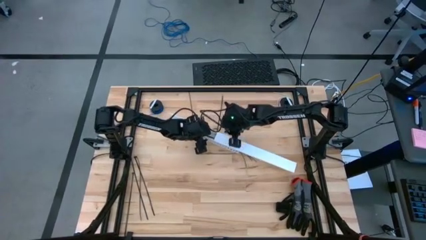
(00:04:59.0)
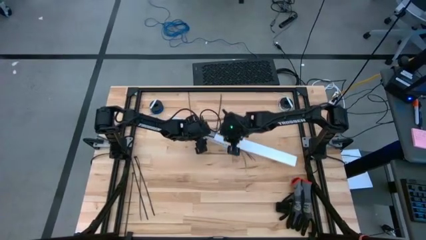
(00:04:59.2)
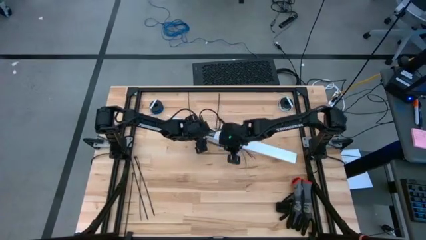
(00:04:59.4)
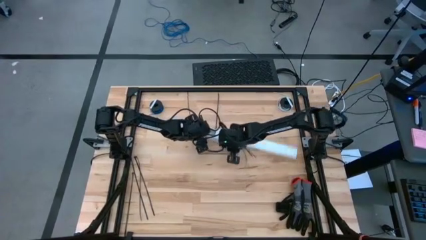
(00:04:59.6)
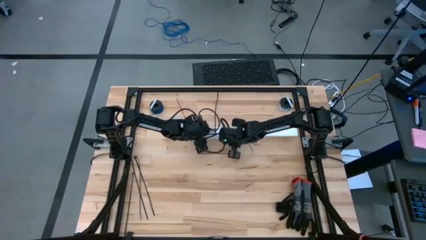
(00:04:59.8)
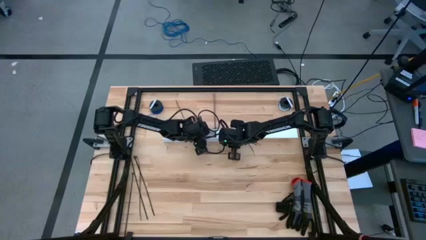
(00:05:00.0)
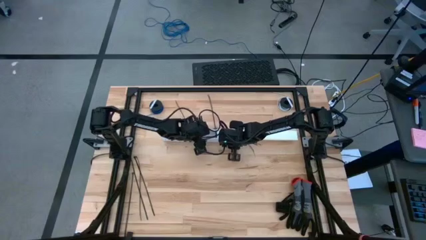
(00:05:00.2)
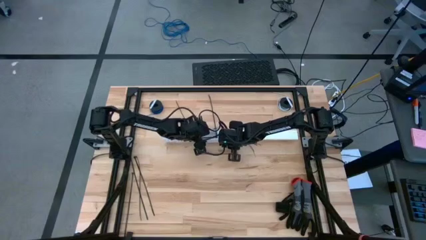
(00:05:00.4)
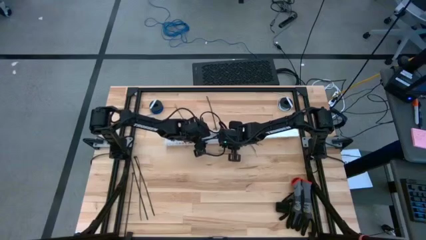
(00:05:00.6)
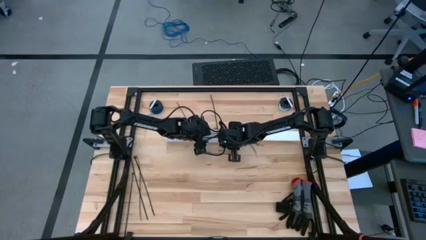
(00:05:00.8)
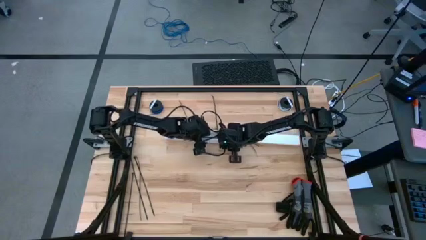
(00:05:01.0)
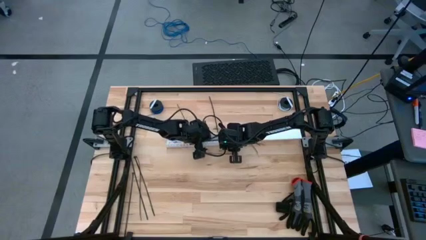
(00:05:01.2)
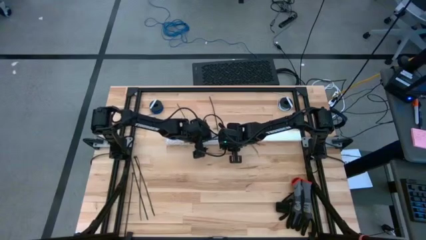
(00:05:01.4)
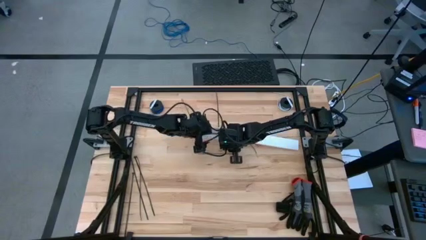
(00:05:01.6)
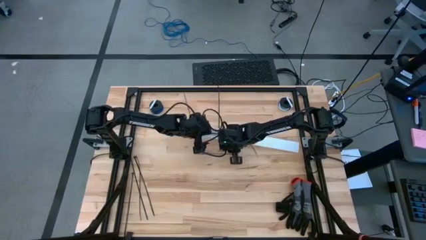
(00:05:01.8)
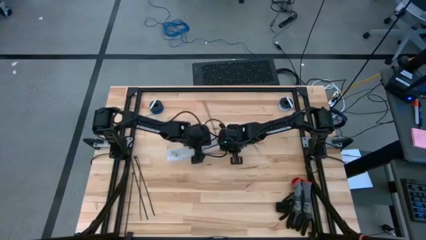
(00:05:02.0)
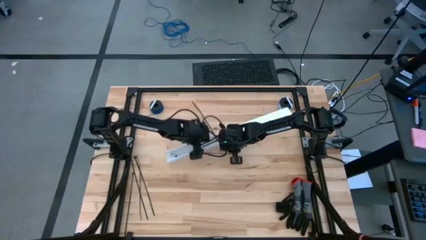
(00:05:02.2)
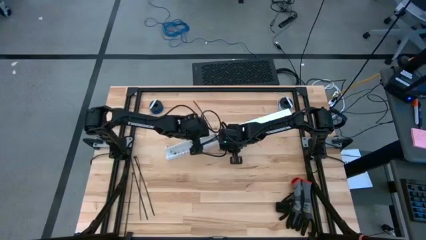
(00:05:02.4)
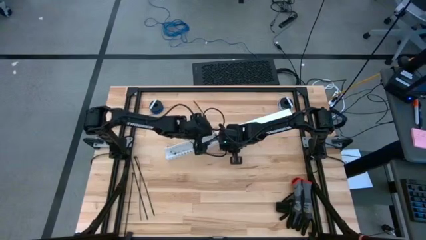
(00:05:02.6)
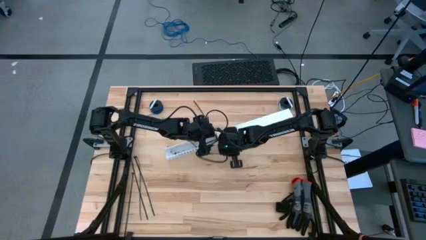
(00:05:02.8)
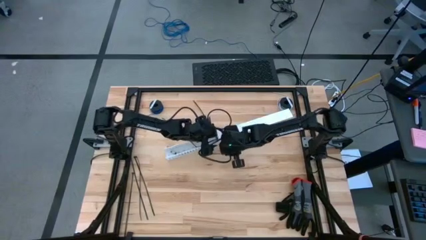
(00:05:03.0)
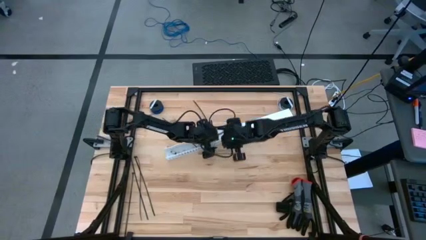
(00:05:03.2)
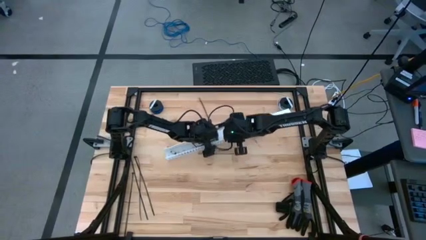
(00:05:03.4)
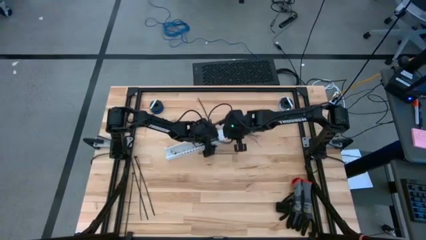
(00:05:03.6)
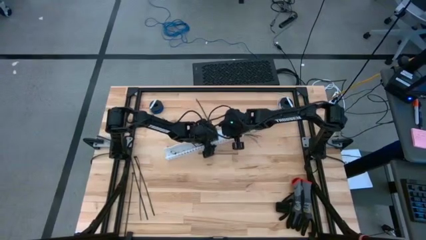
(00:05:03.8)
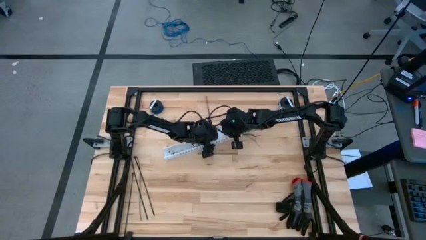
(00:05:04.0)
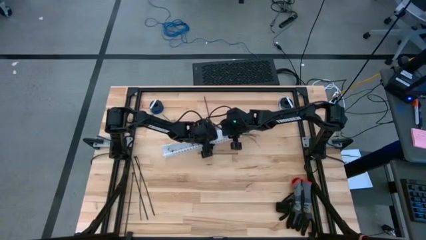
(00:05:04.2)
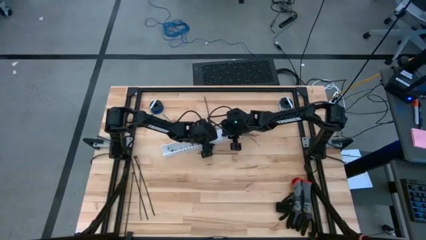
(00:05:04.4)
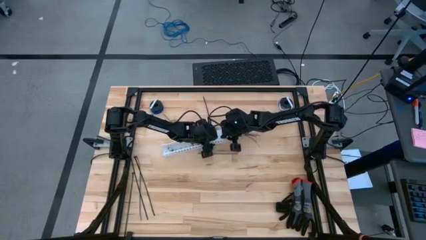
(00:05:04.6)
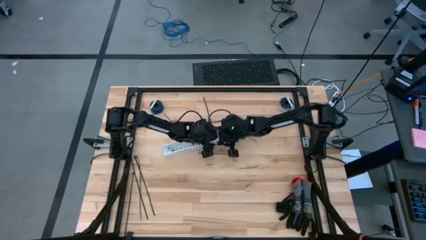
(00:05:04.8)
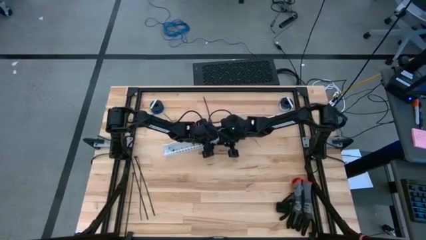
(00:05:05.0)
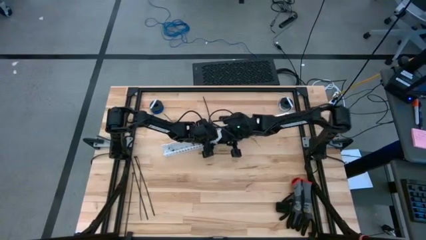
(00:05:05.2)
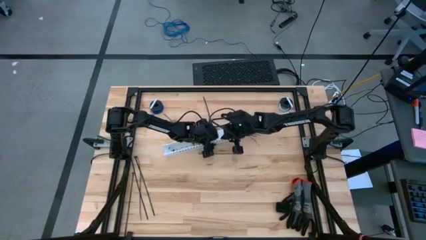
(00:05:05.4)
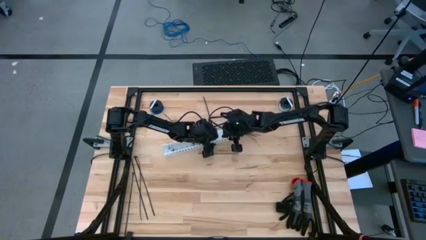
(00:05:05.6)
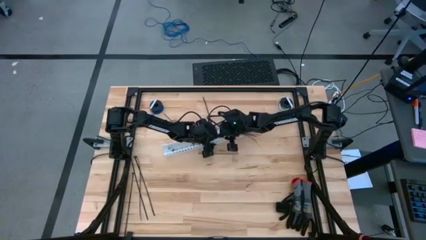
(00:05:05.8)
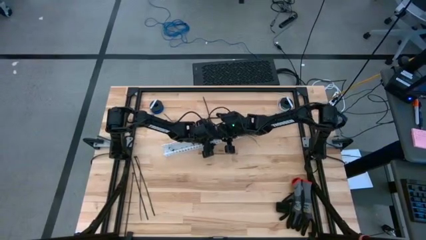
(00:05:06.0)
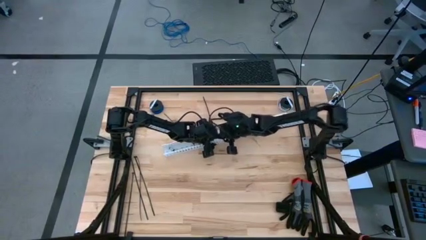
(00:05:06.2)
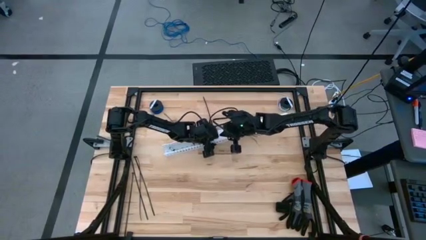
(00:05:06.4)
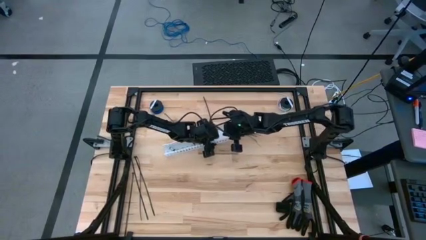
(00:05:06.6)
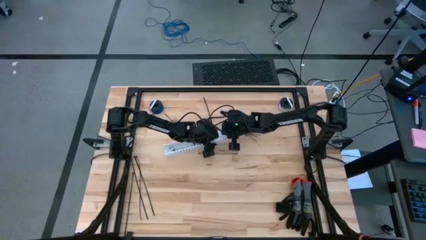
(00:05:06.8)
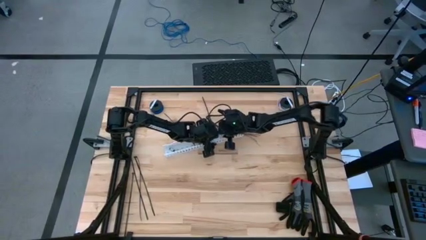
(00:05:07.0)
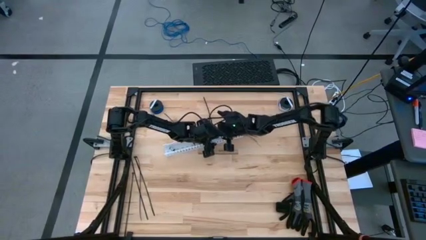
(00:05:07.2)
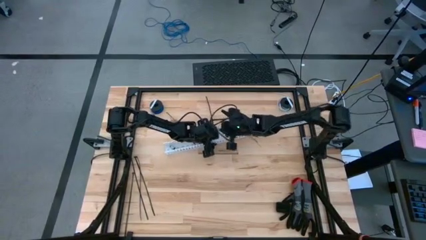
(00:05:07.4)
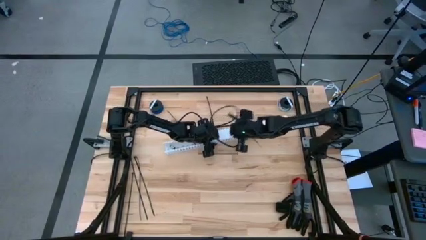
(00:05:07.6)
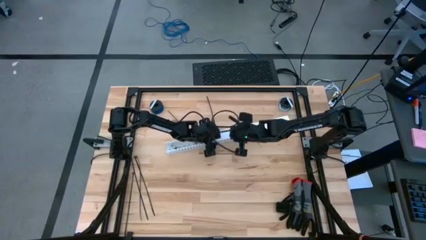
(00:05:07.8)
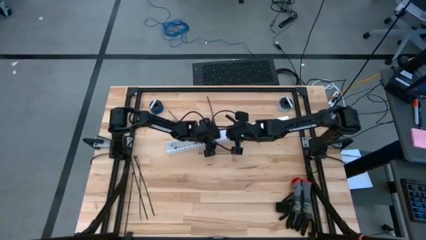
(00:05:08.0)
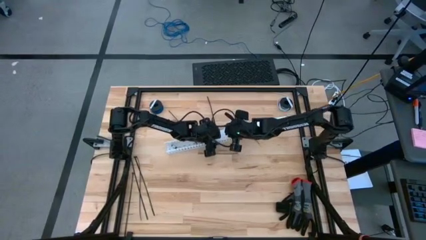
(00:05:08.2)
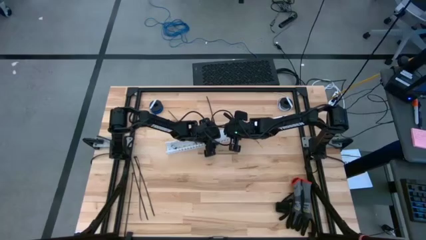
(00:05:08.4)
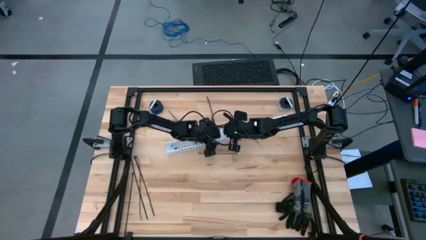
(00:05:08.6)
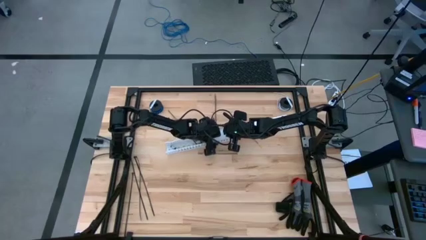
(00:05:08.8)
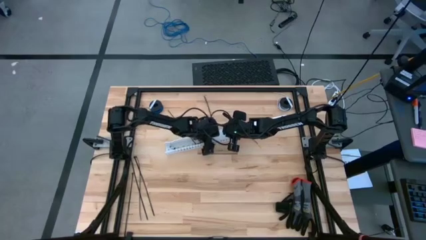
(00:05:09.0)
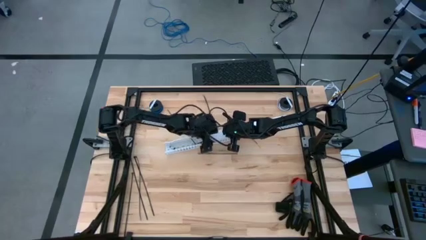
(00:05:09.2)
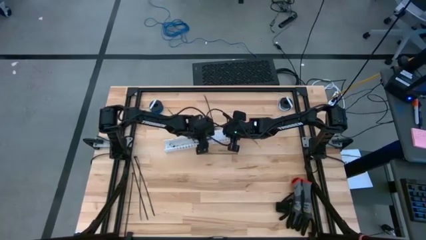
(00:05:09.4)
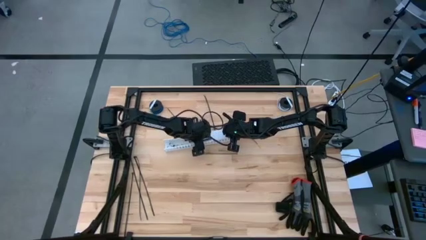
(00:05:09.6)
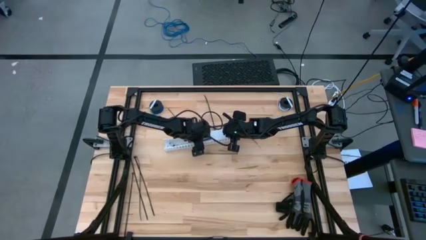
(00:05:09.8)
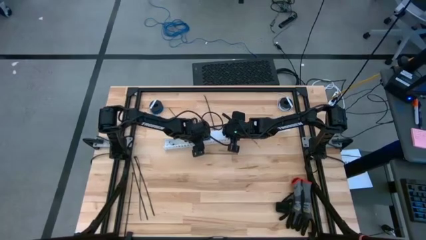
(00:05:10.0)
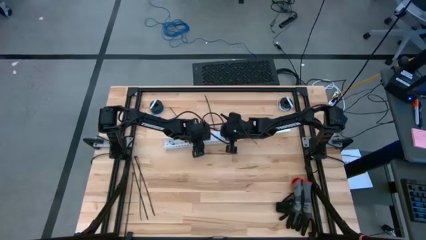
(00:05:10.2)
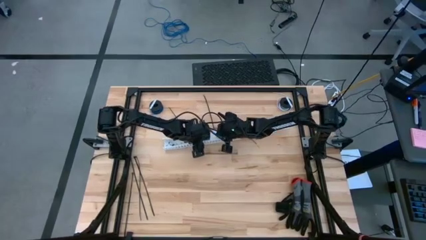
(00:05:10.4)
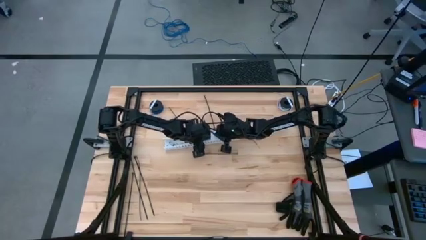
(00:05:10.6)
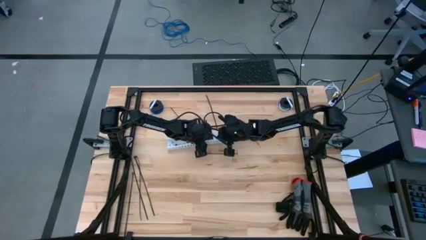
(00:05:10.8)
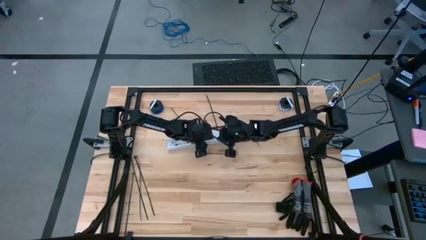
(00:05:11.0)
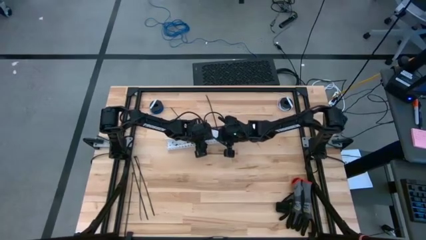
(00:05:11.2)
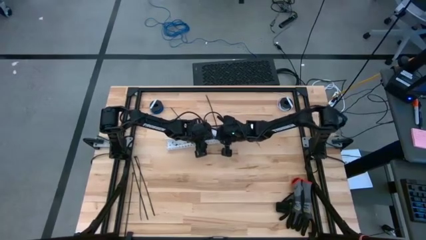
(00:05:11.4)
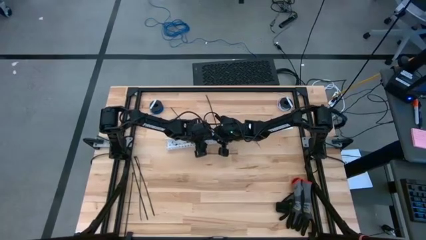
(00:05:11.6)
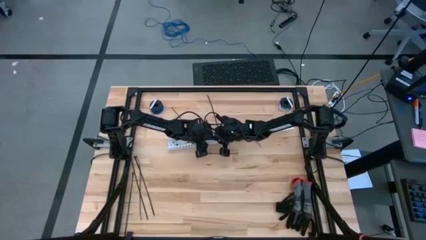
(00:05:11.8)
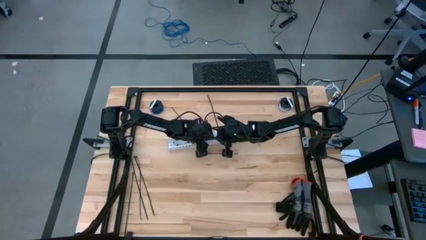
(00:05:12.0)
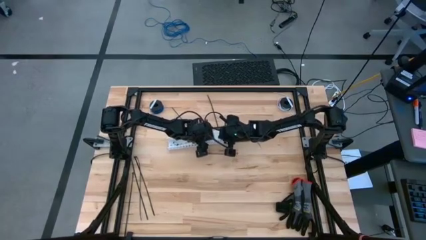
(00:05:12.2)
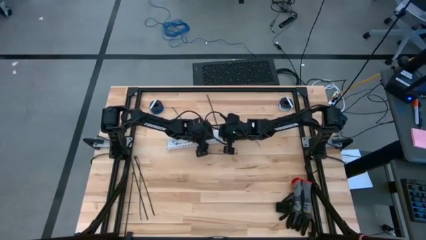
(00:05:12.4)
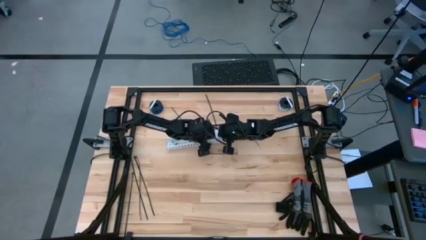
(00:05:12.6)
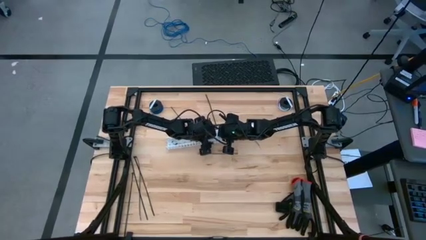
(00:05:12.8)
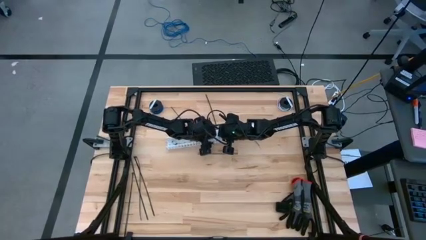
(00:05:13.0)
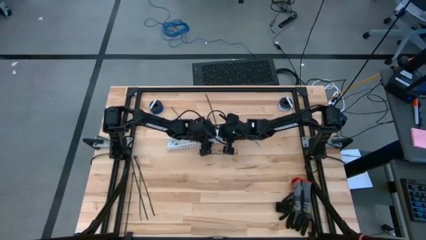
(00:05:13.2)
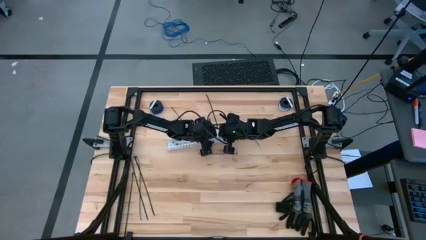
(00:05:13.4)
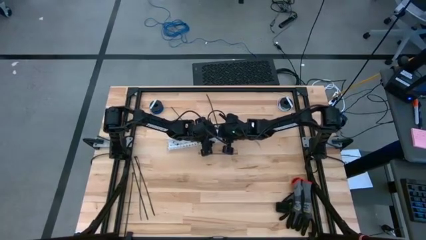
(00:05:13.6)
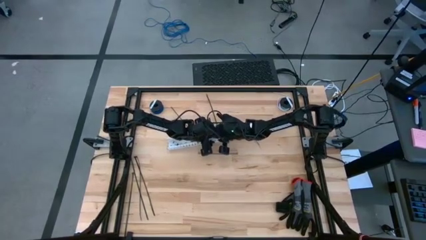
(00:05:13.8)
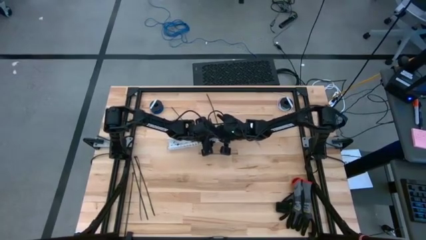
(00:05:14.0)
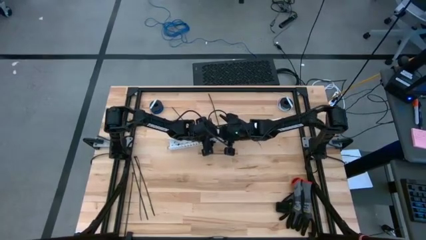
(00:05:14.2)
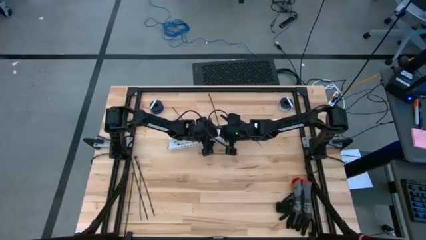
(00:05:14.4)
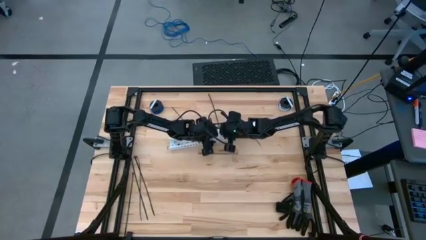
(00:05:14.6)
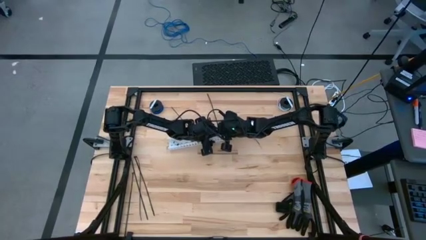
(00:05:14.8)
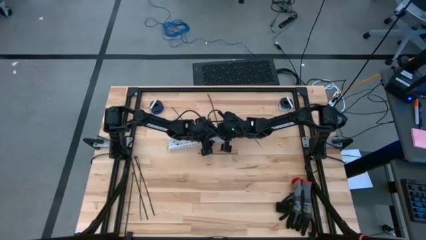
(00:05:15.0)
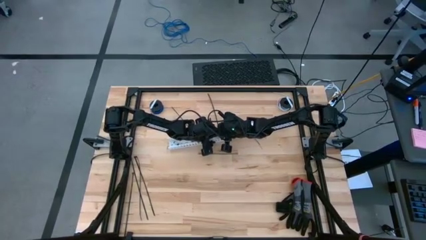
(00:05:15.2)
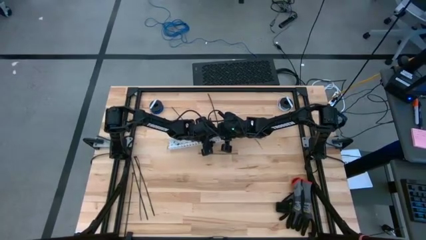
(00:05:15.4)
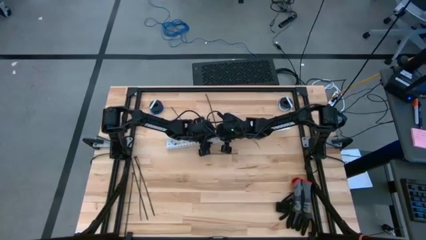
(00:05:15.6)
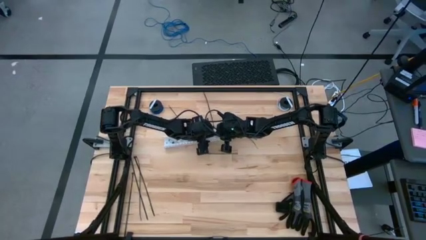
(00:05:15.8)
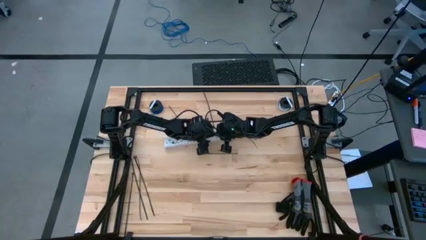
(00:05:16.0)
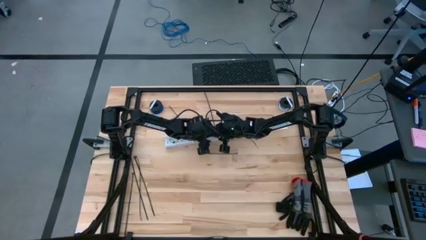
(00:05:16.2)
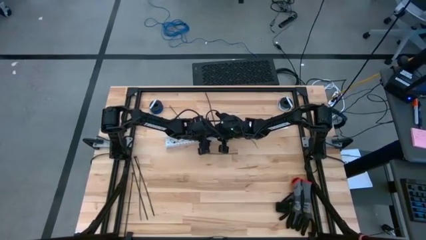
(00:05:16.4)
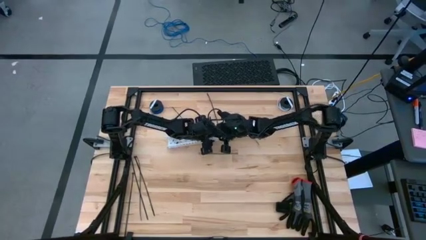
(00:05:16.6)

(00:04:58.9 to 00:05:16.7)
Task: Ziptie cables
Close the white cable duct
